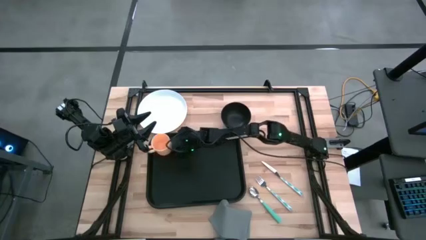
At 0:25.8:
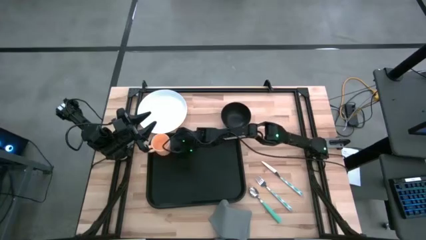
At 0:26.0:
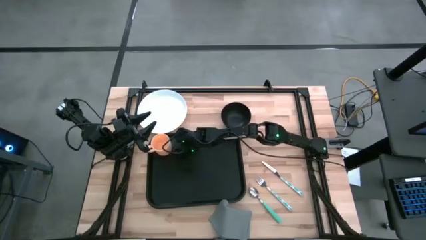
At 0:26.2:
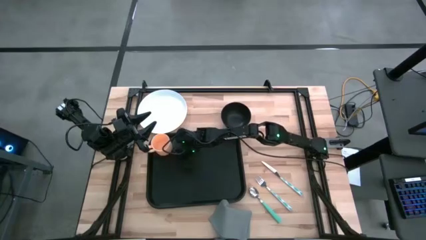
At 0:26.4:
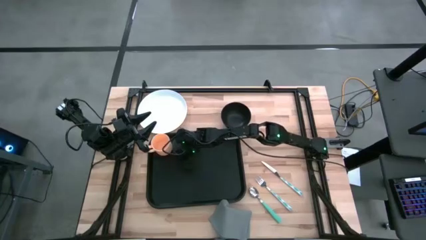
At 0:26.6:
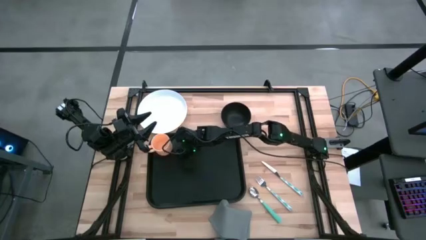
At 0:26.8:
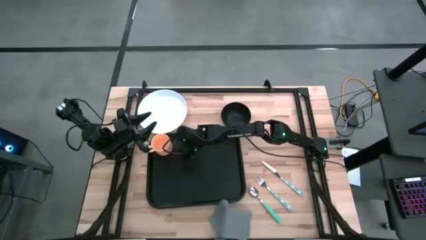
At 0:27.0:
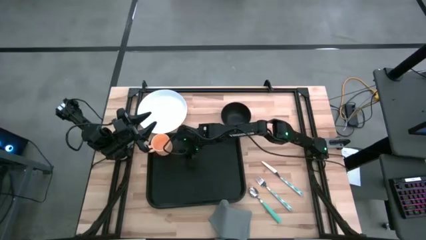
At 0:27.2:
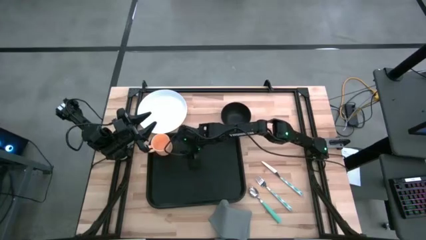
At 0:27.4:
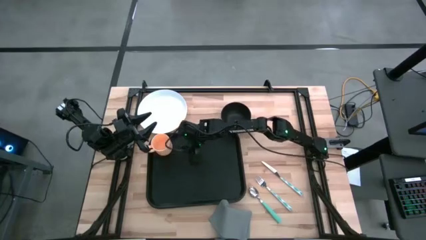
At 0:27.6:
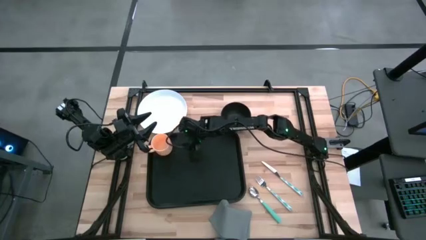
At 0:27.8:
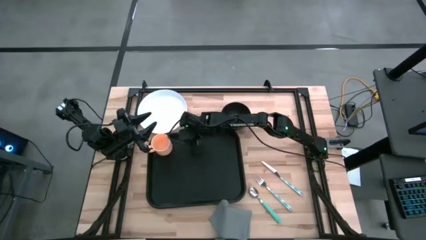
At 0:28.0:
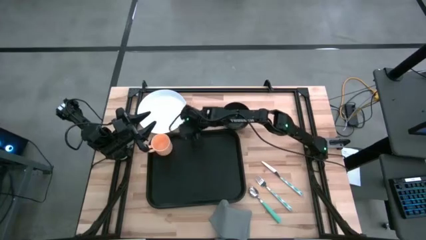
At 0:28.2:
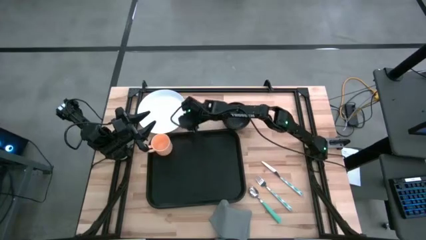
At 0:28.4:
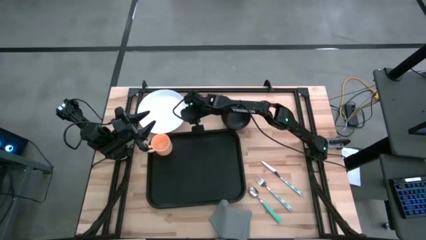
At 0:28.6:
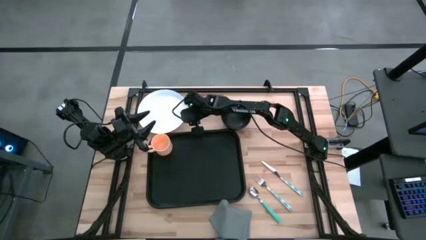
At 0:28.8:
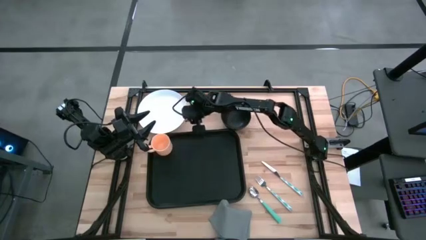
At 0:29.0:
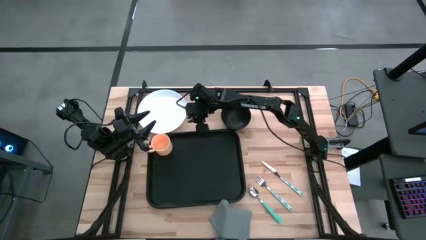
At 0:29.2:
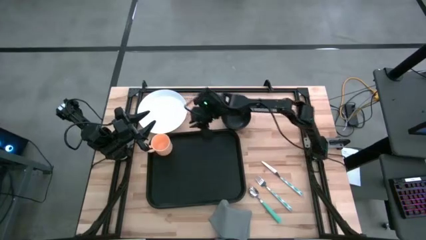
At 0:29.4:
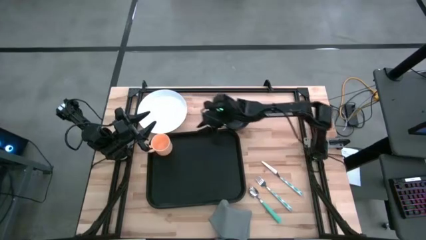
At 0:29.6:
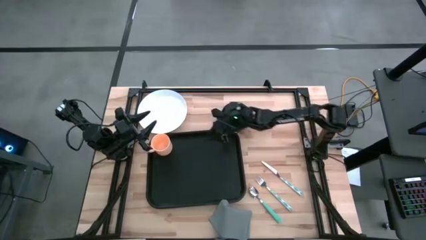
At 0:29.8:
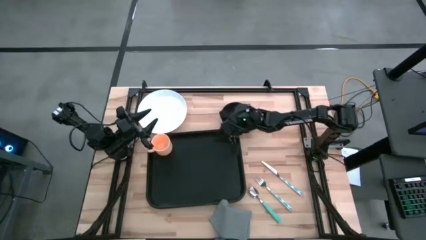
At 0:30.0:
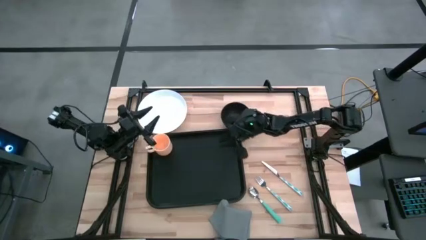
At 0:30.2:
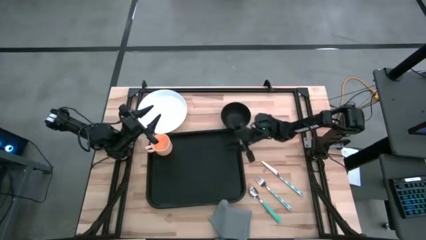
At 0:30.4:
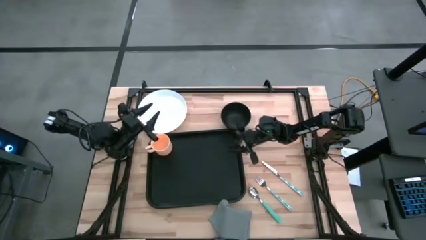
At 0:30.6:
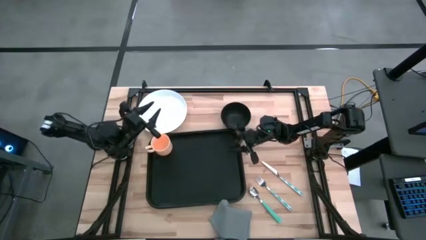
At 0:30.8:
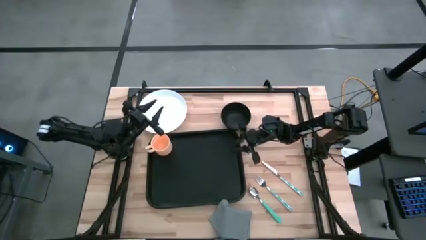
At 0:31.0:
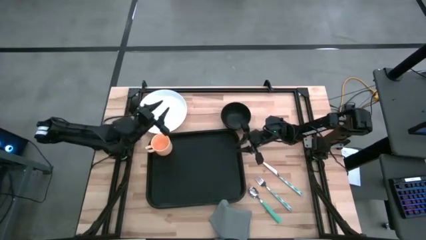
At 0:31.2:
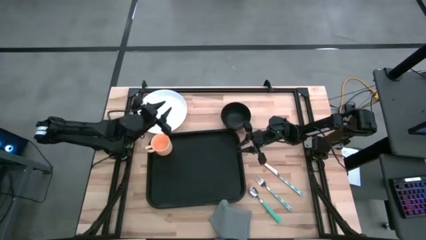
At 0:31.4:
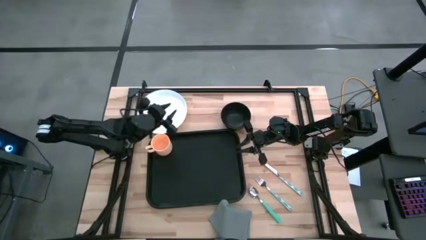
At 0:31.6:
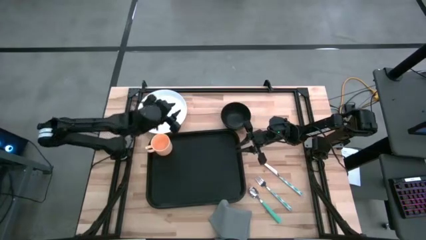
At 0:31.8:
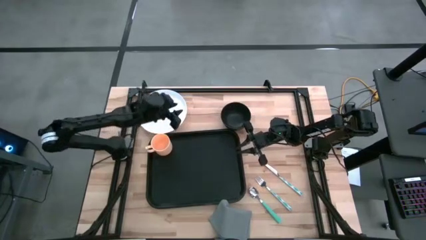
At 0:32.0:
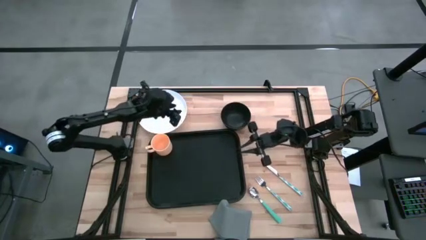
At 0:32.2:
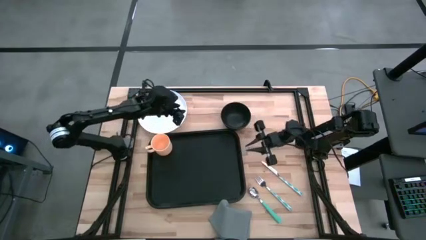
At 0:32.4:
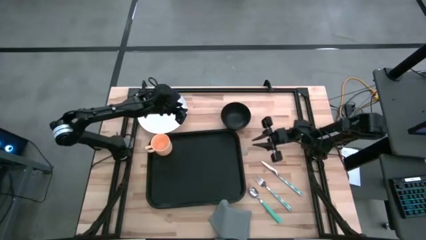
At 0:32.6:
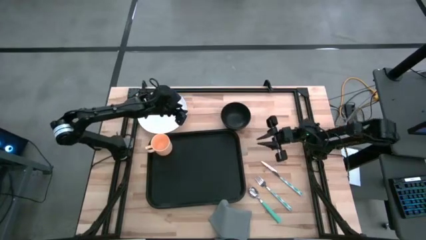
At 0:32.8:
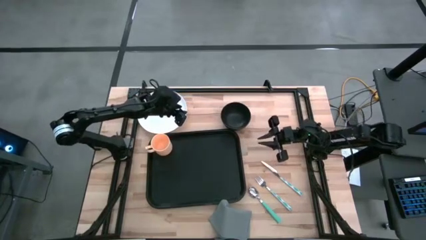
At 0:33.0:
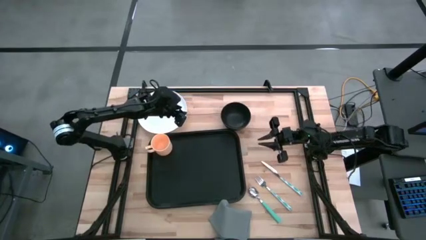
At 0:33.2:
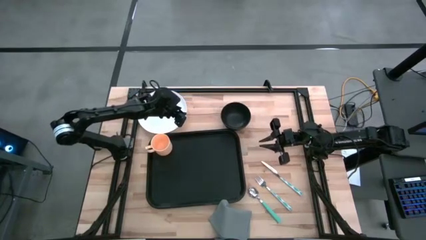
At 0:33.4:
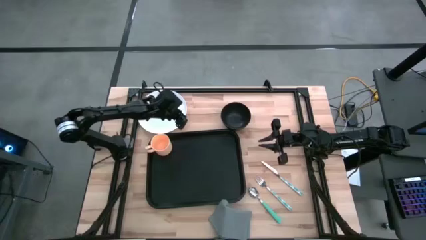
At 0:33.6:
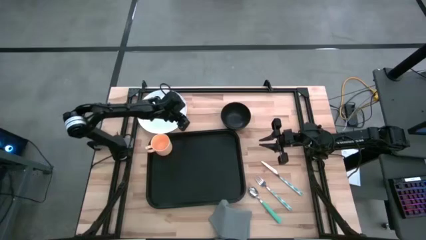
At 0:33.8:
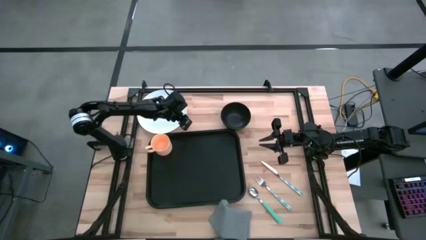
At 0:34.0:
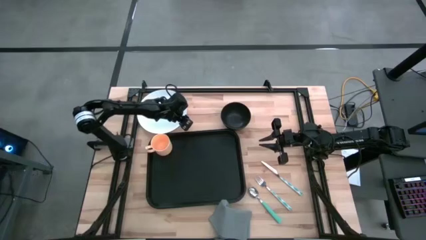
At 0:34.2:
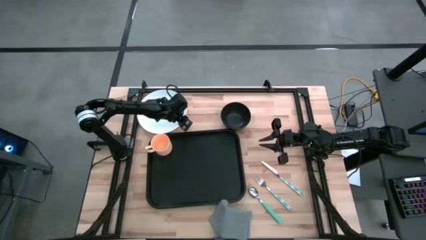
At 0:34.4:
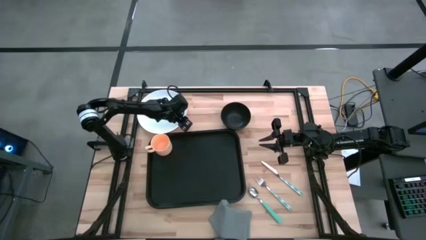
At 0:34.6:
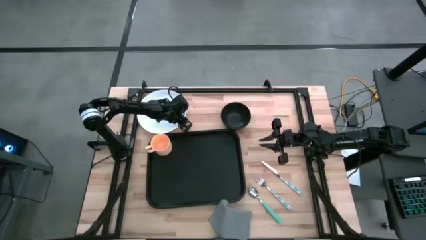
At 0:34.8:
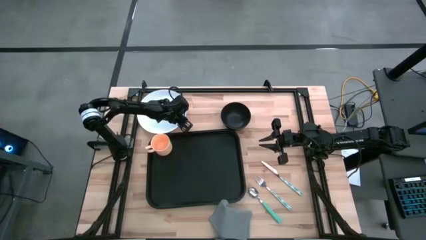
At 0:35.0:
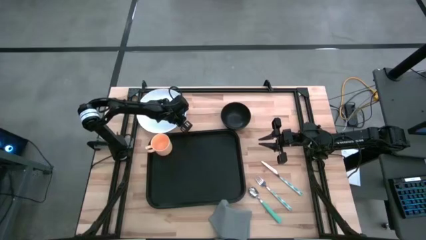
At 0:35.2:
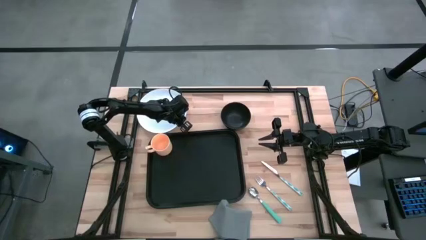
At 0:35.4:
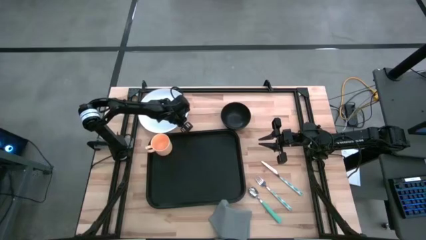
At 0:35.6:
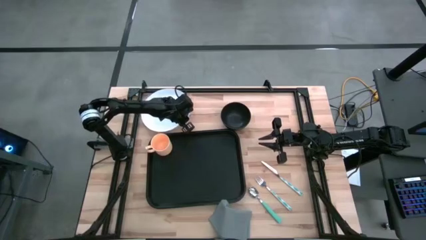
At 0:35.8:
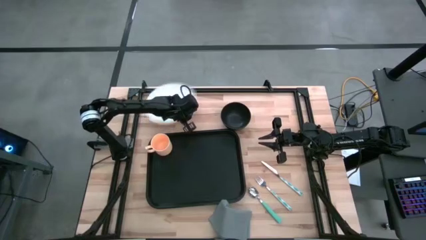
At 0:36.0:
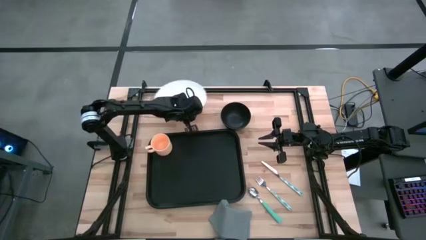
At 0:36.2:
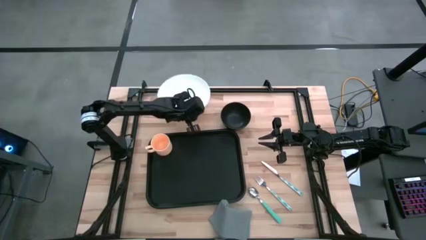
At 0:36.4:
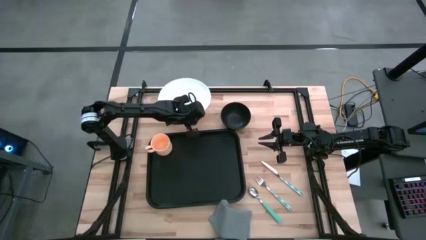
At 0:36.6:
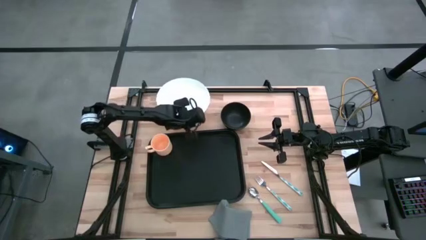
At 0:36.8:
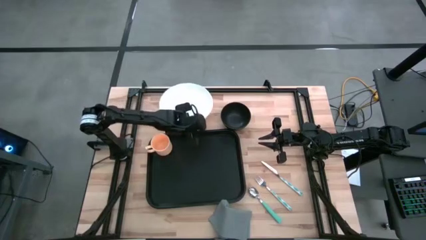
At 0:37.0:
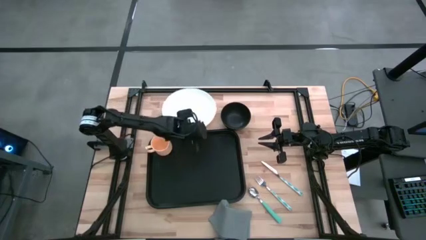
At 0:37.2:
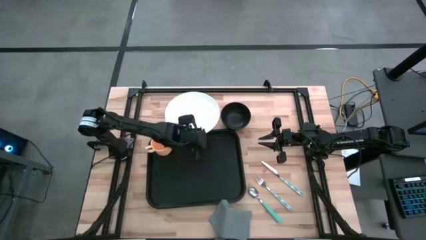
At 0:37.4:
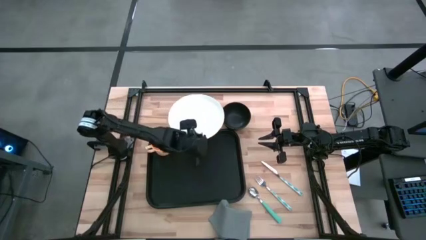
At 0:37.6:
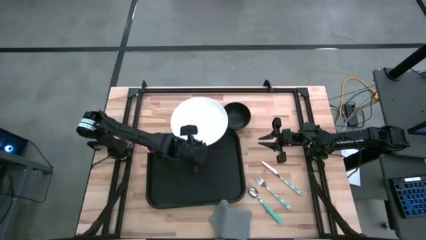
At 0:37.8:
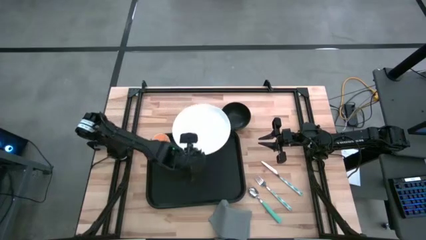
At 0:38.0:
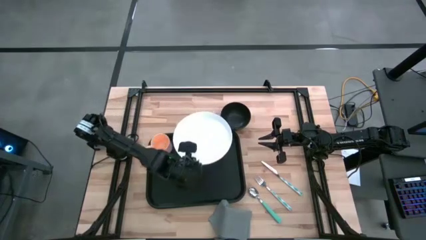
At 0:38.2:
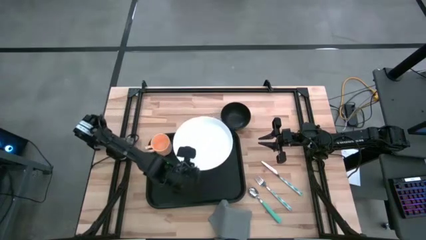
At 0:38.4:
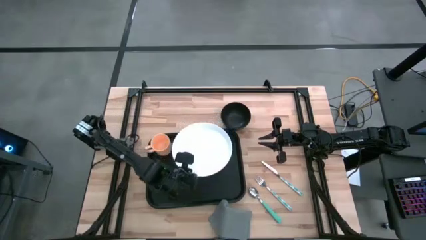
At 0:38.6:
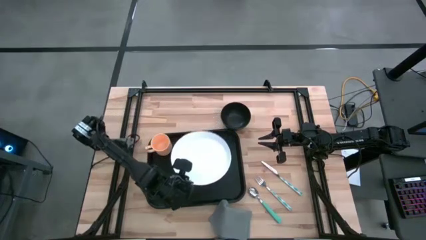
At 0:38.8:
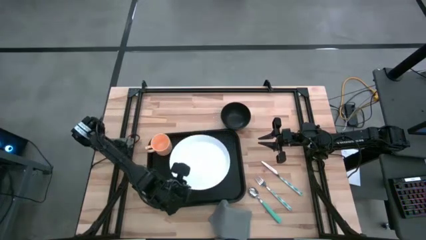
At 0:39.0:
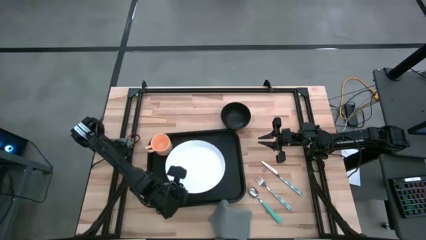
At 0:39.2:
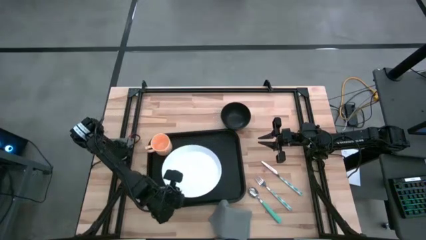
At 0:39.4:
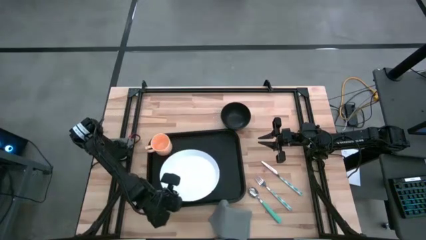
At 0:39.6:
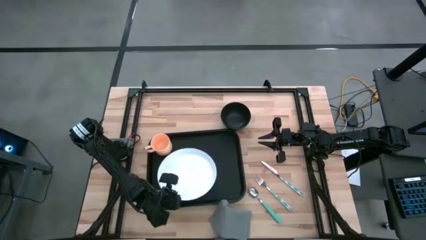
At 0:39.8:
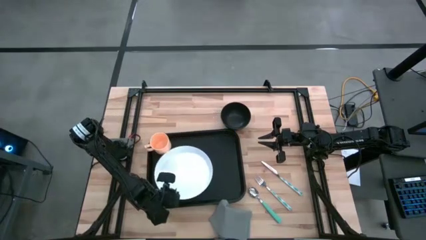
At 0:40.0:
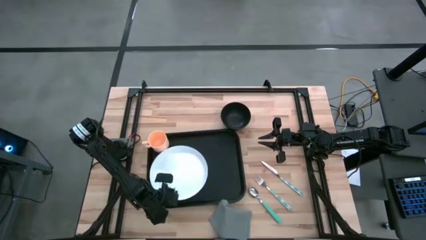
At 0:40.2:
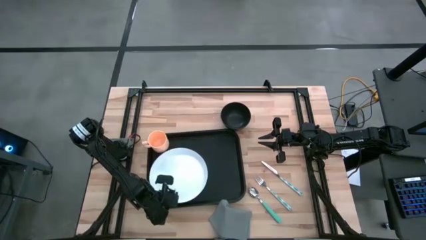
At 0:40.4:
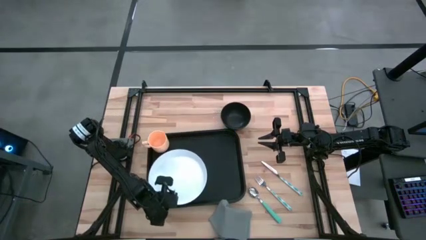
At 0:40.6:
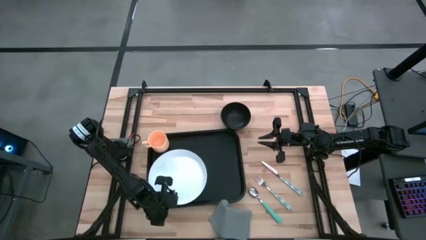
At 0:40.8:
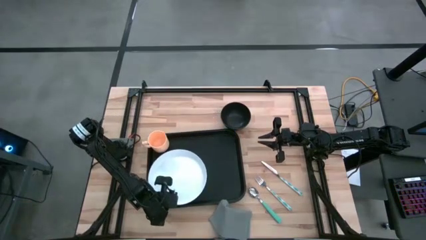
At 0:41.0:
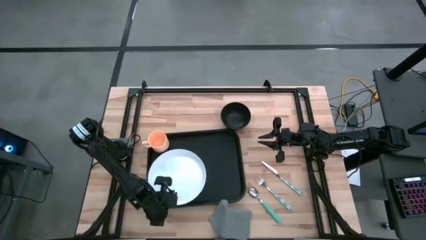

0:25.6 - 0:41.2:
Task: Set up tray
Put the white plate on the black tray below the orange mug
